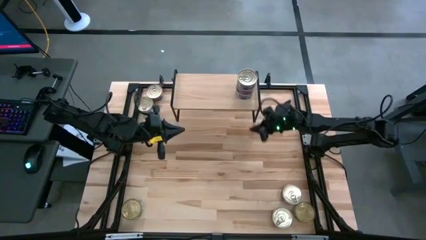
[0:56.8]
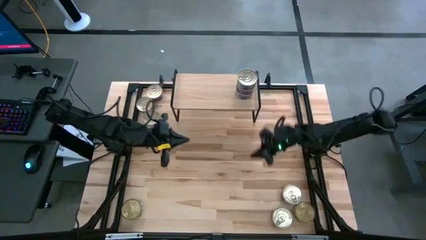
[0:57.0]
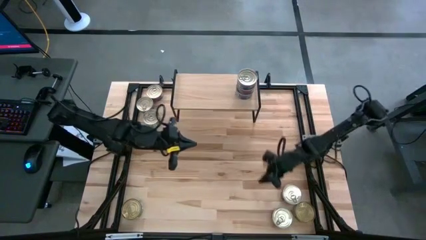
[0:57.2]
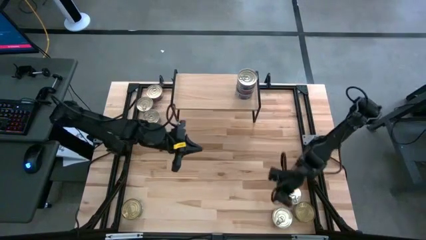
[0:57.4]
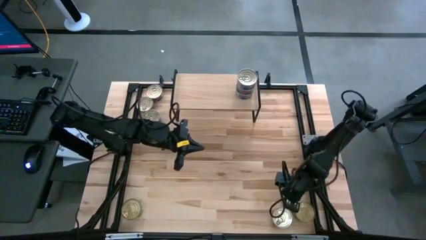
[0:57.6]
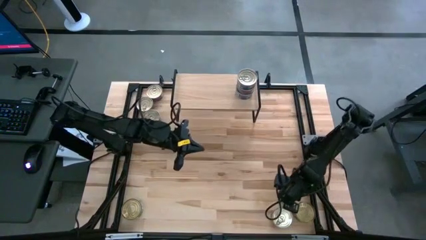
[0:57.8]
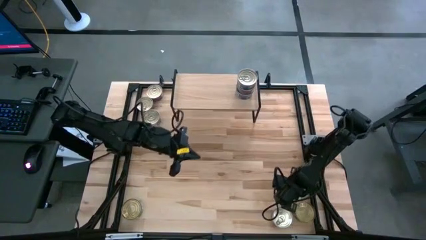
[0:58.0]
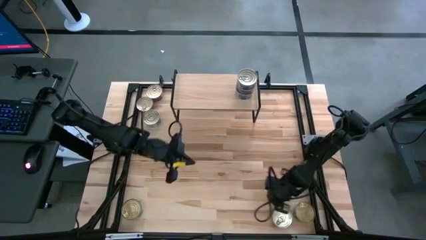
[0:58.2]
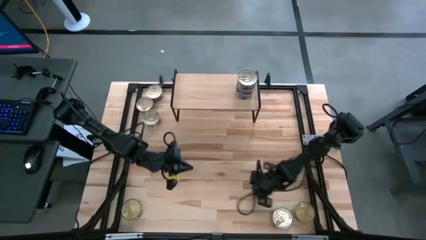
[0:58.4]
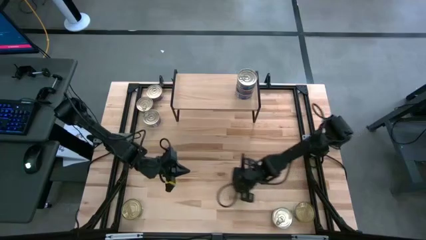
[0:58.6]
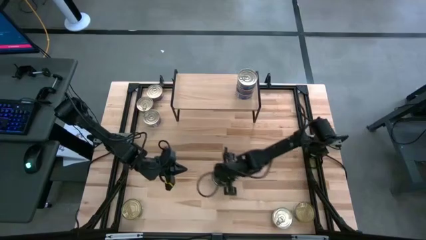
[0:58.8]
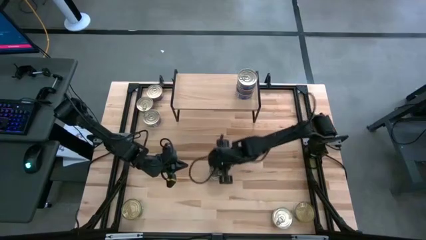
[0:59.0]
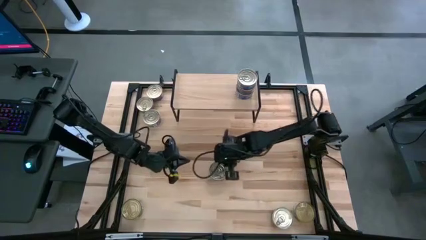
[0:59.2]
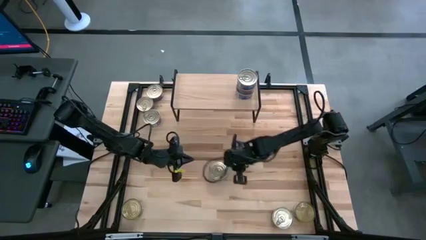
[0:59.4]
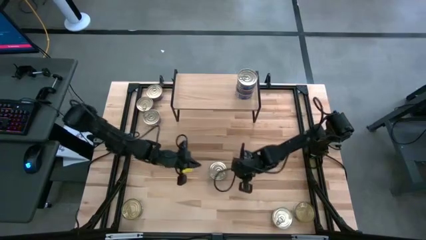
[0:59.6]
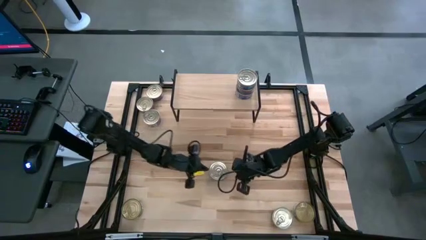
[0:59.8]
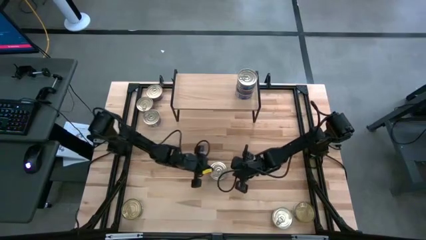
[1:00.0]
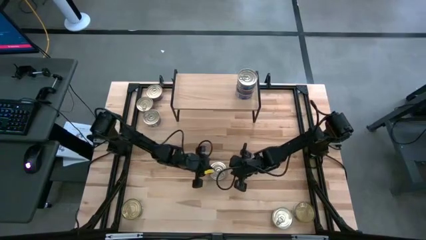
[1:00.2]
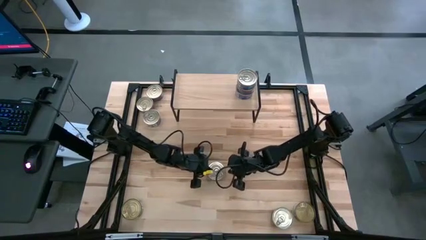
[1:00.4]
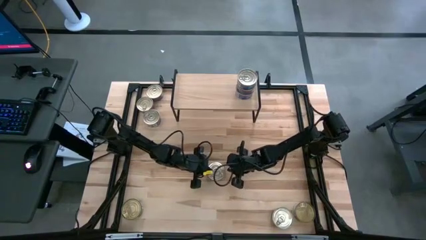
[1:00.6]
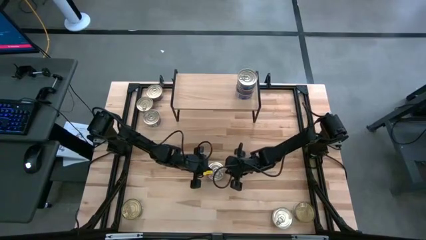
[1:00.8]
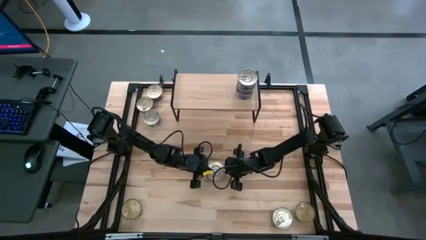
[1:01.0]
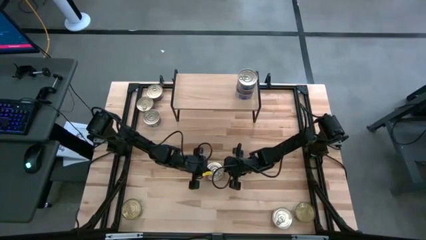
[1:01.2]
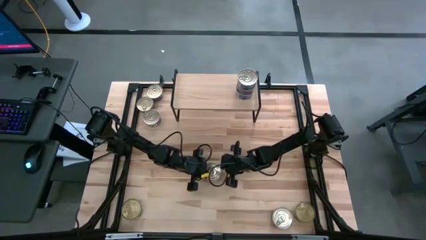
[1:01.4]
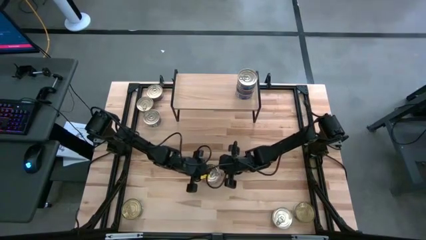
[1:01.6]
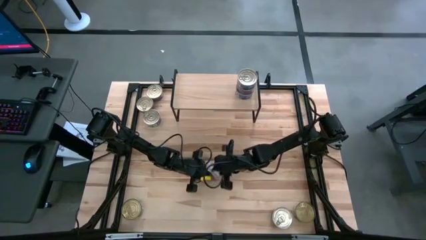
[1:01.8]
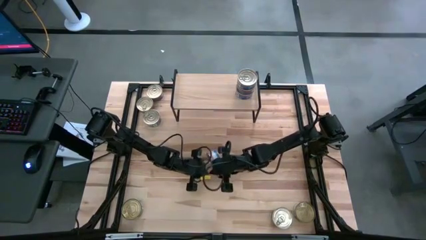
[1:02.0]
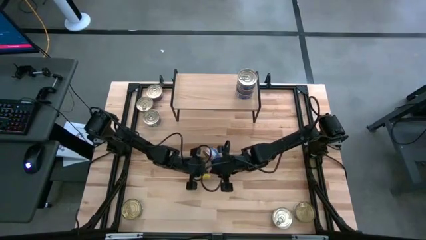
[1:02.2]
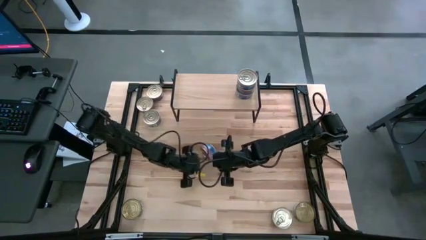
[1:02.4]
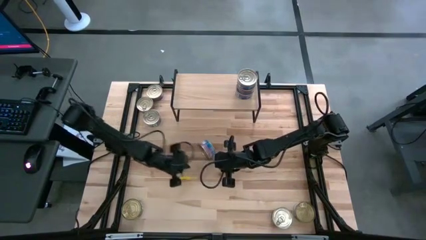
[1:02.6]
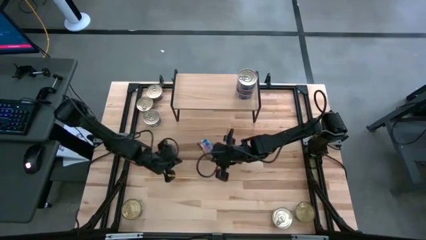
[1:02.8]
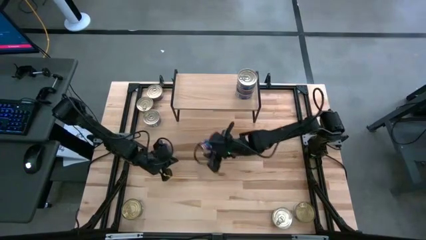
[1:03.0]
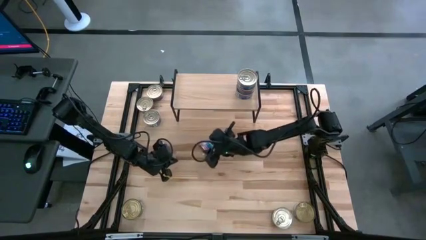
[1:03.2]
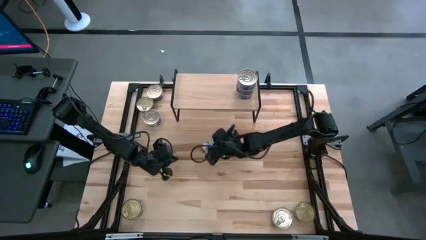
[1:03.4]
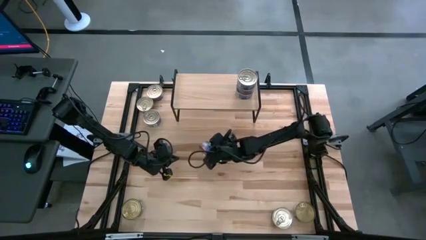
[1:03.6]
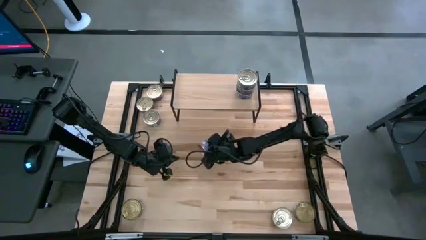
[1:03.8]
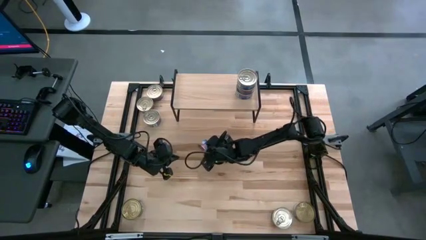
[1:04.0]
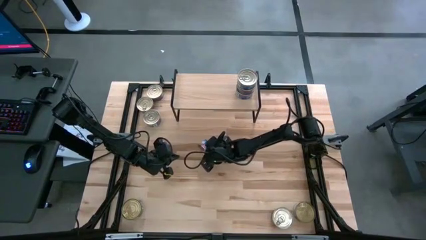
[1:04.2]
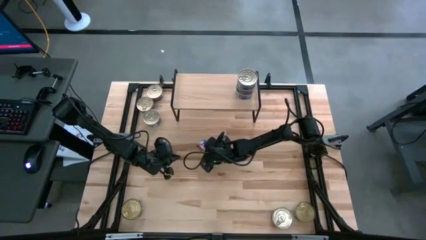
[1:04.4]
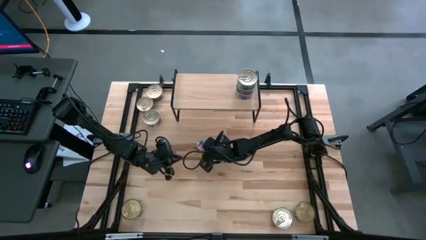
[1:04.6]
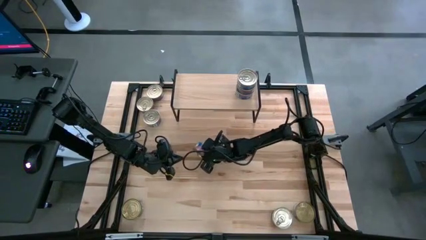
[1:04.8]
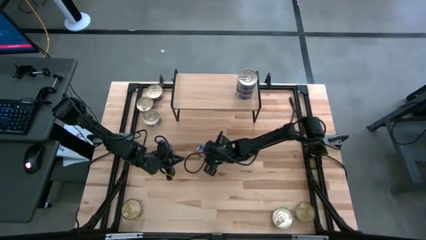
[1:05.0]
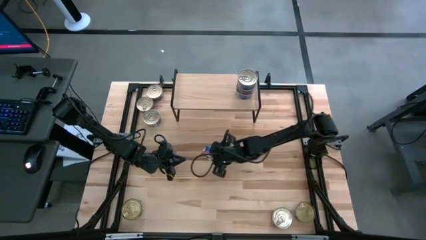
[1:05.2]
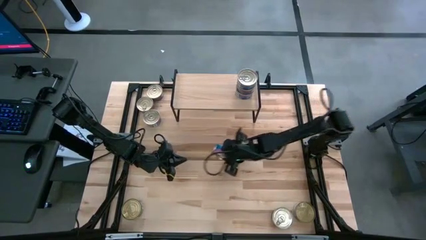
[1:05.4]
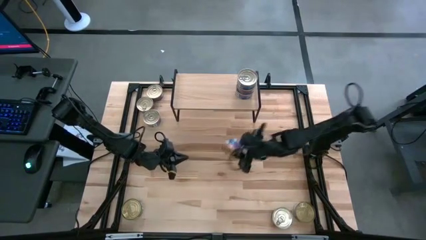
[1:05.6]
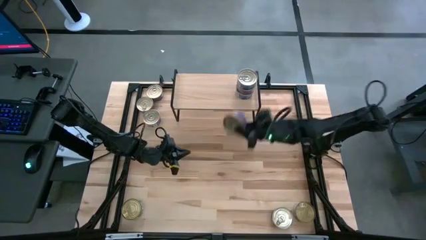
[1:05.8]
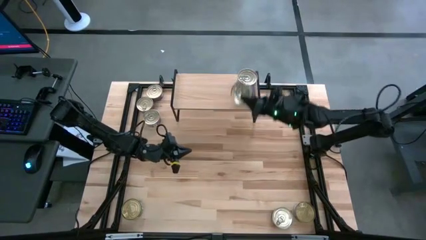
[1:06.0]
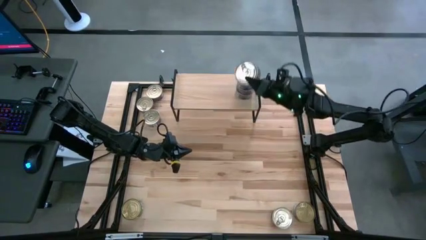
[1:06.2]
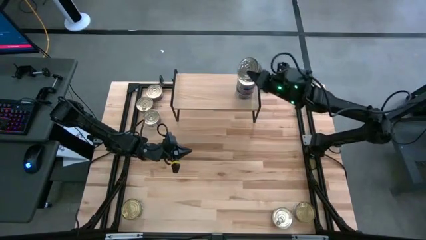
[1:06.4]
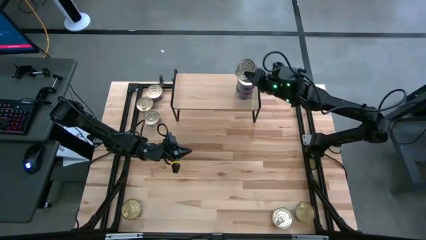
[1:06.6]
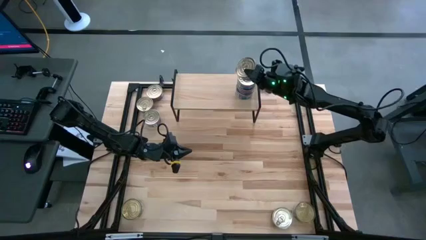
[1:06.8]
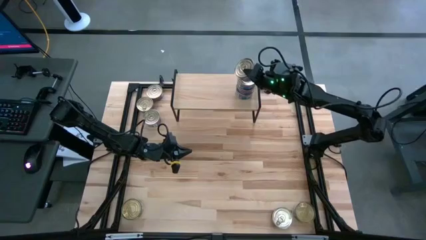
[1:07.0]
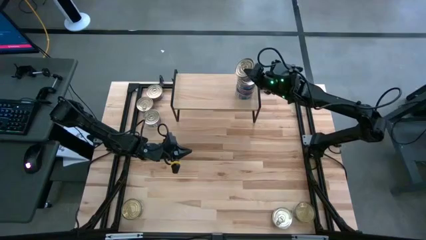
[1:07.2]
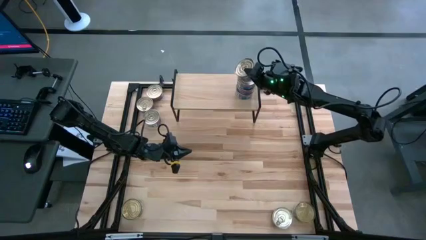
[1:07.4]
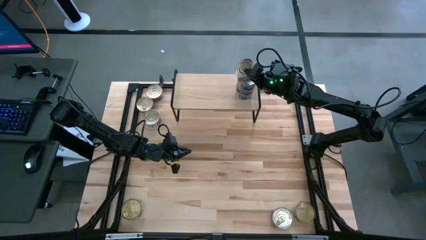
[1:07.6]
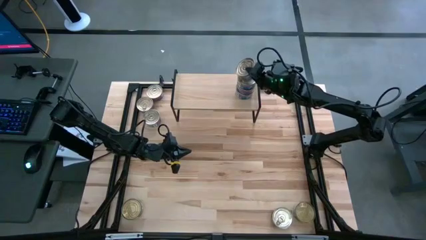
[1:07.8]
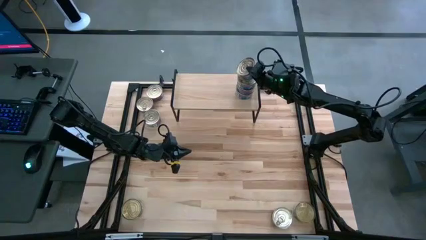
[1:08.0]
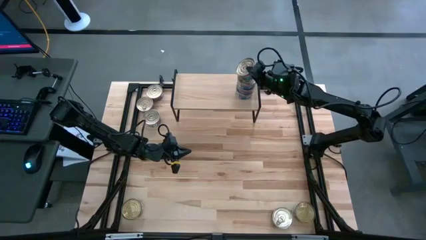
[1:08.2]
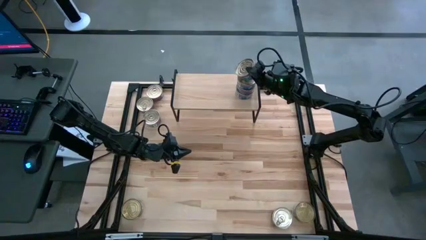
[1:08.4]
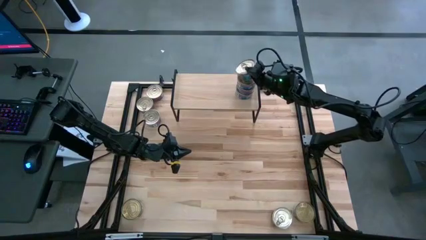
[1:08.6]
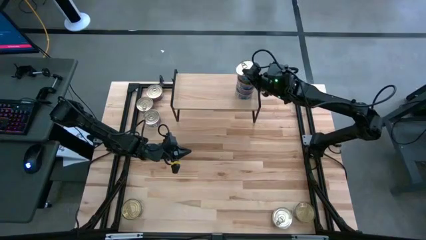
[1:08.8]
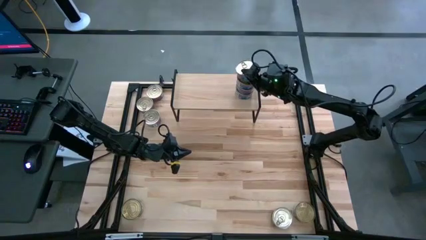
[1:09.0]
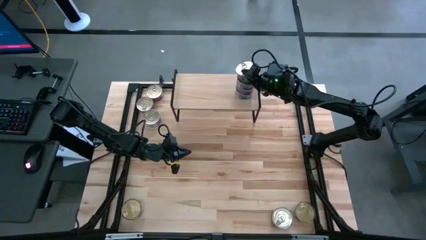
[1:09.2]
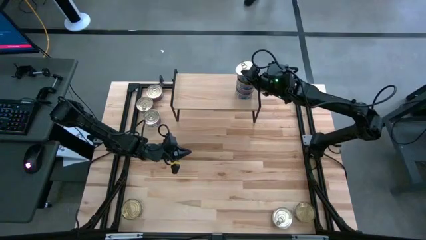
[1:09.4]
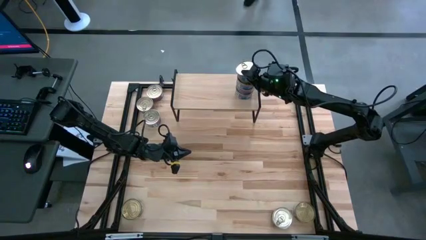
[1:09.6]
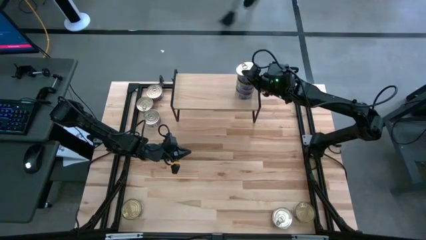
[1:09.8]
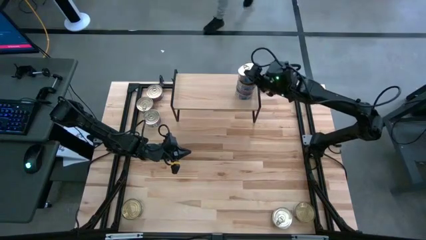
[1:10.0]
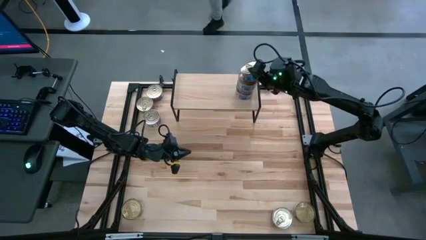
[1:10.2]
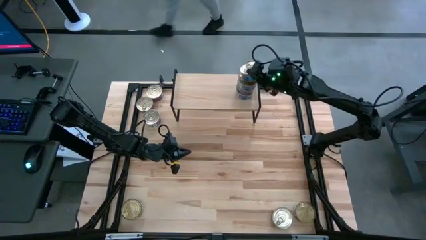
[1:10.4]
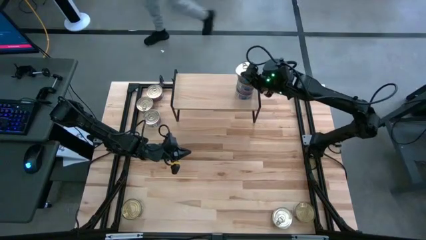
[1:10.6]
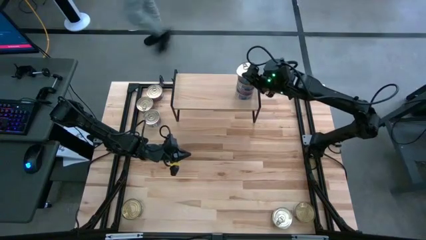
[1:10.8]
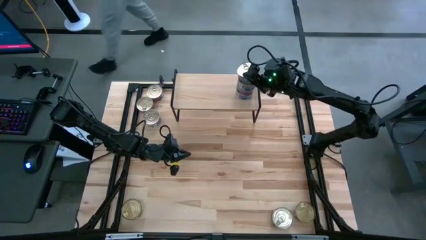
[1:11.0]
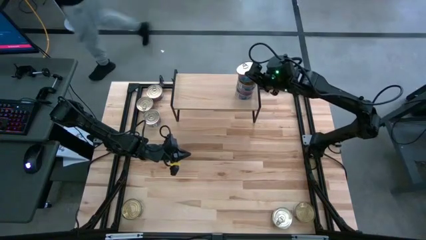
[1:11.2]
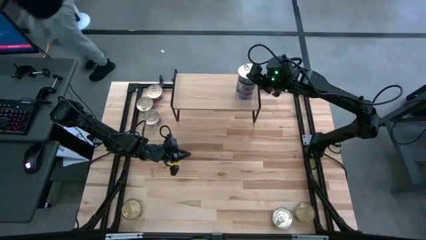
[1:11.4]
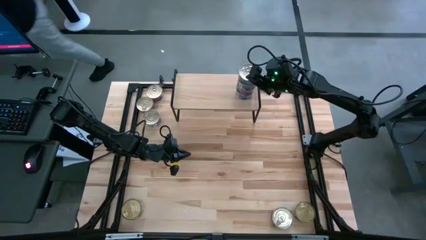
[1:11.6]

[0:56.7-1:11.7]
Task: Stack canned seafood by type on shelf
Stack the blue tuna can on top of the stacked blue tuna cans on the shelf
